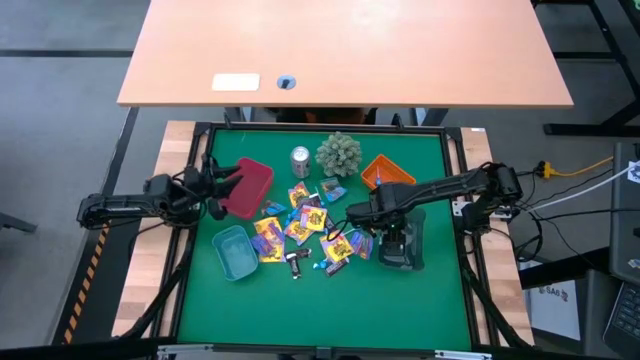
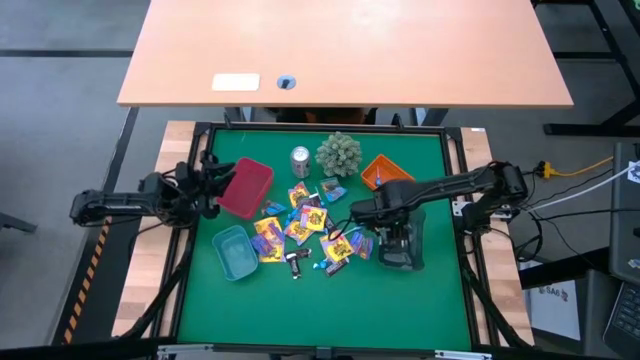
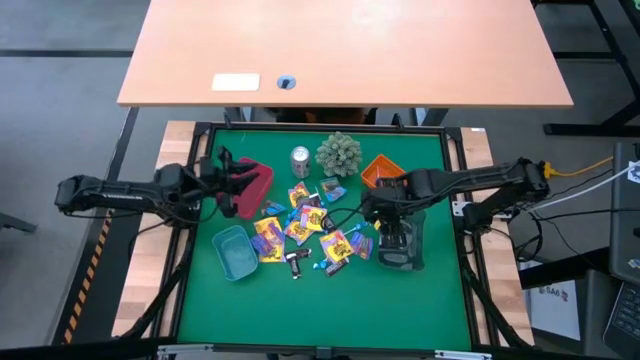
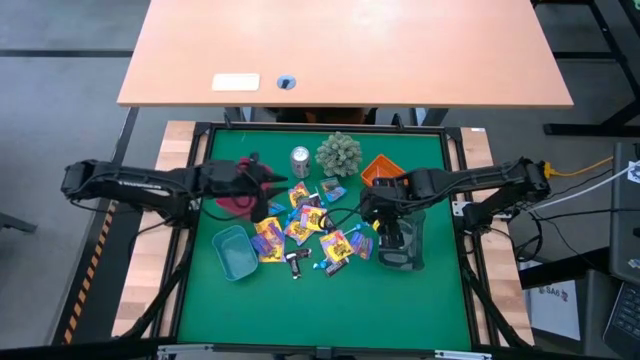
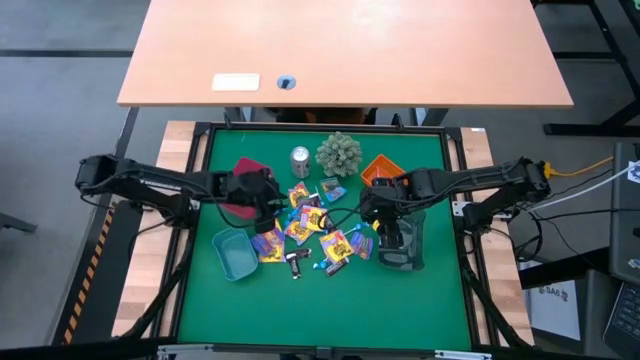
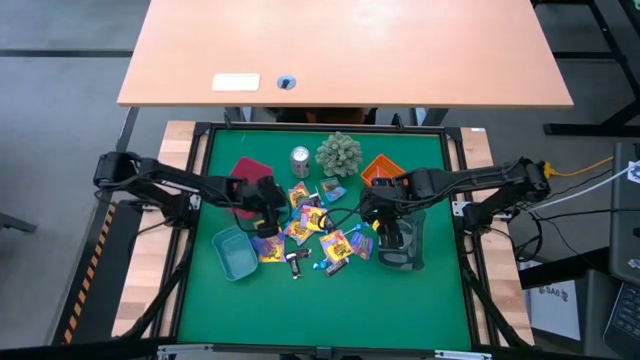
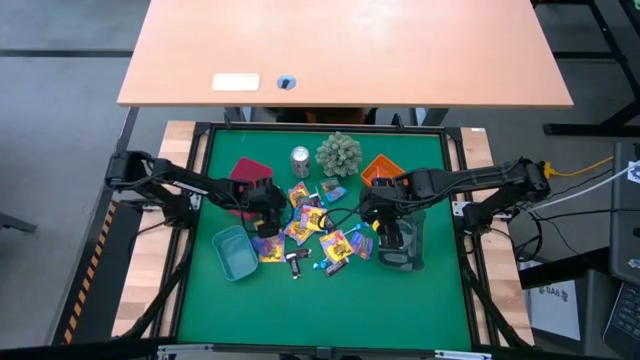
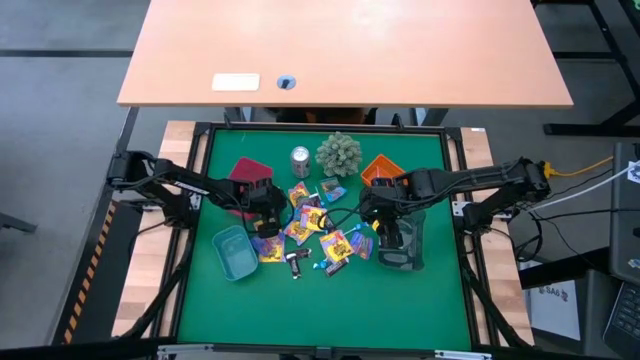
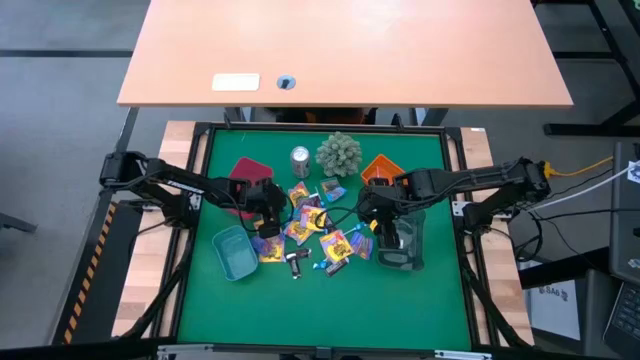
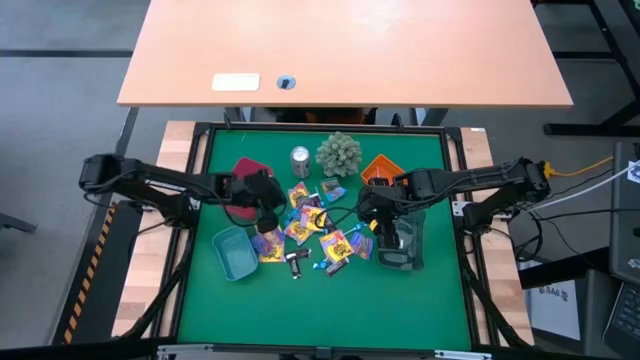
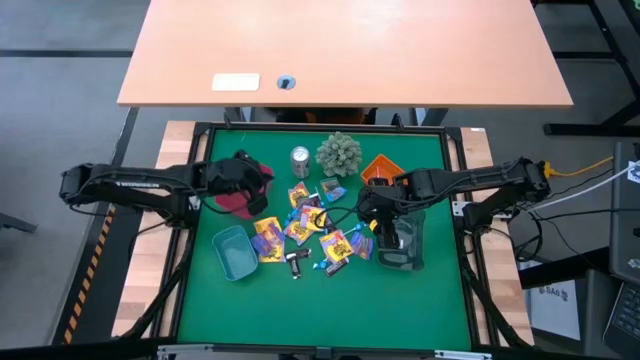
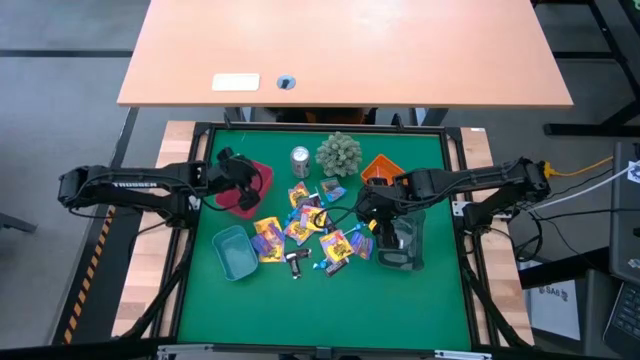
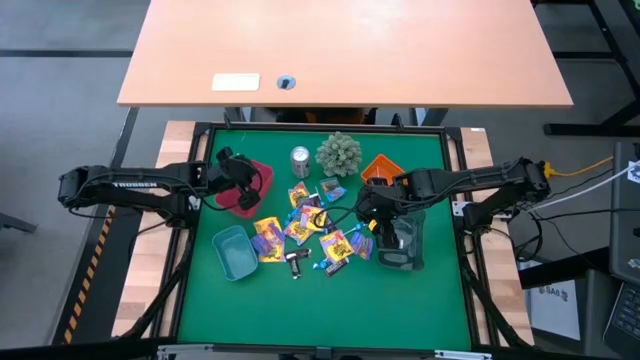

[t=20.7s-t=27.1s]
Task: Sort candy
Put the blue gummy into the red transparent bin

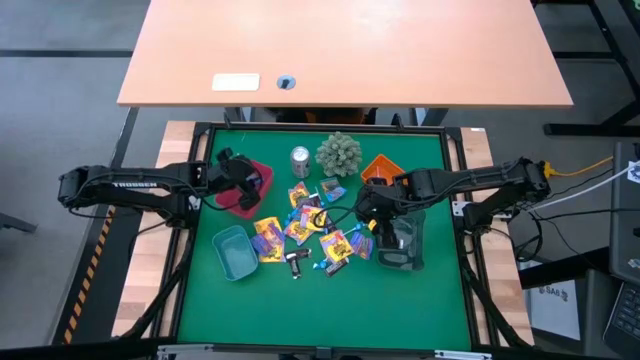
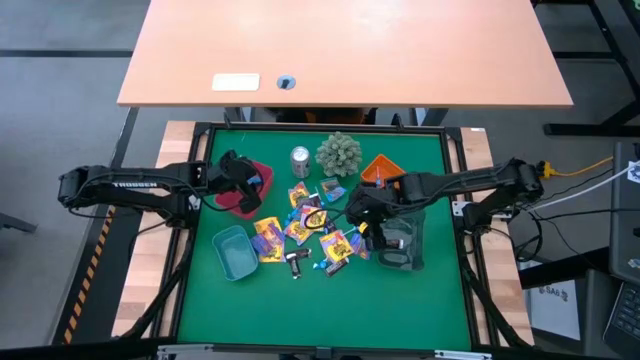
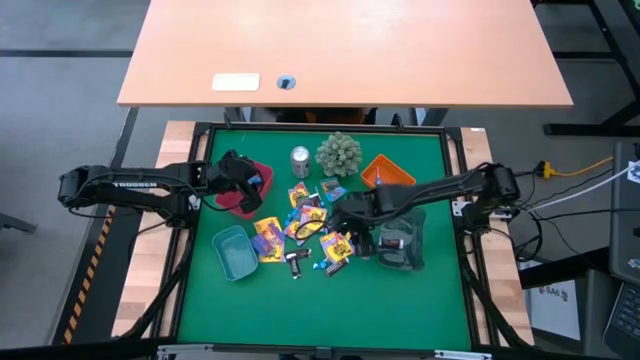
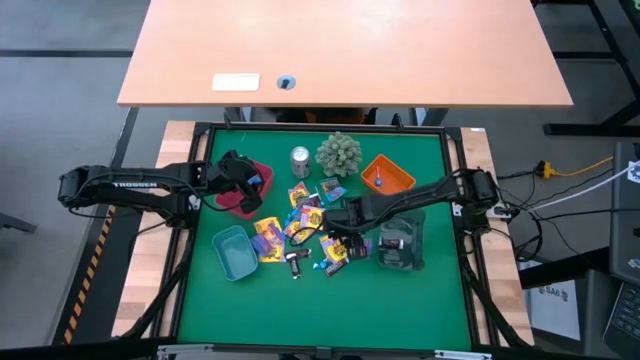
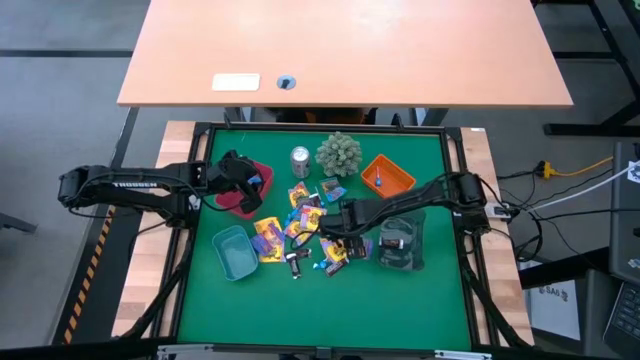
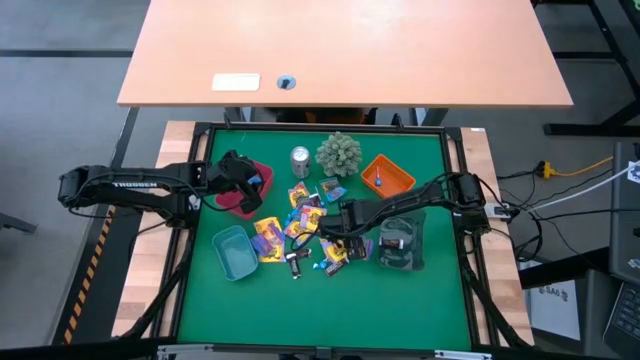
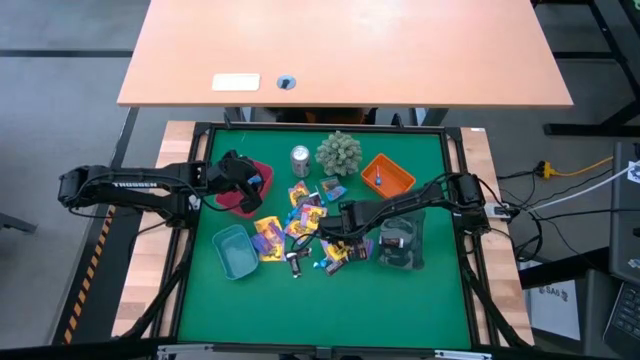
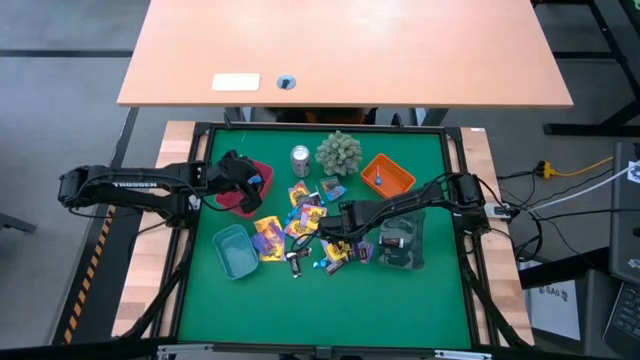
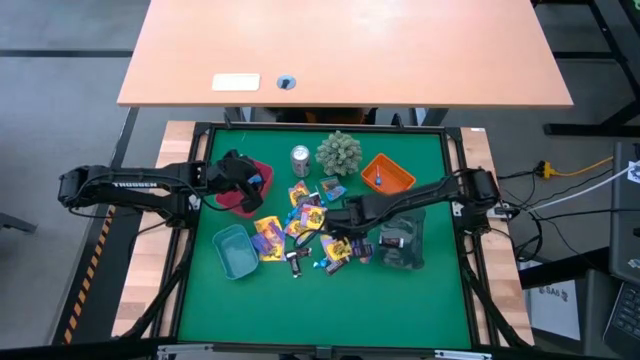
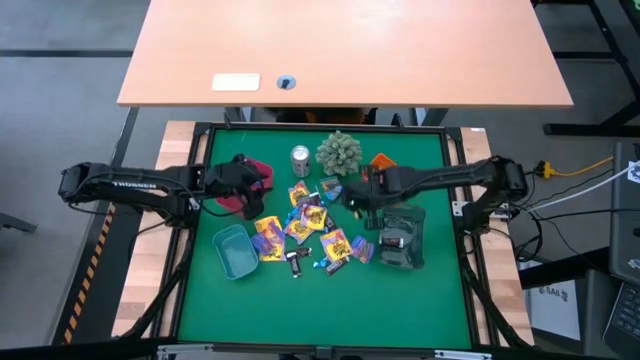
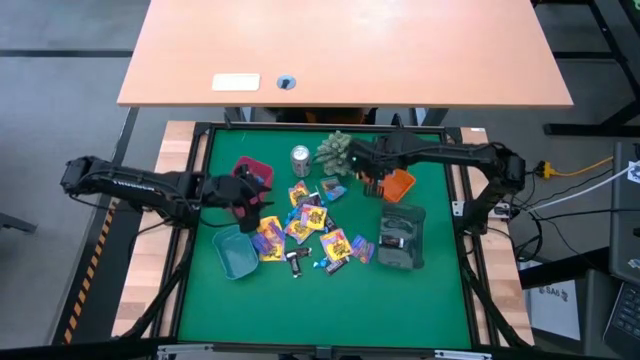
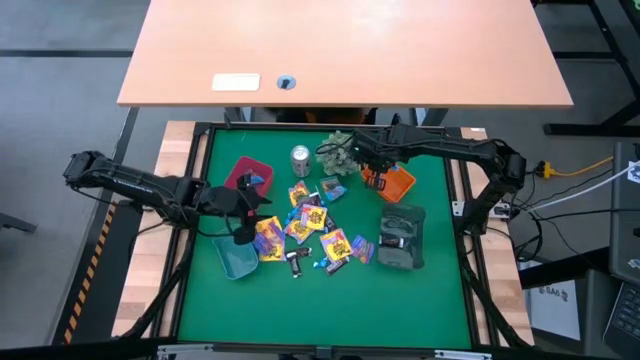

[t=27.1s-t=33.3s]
Put the blue candy into the orange bin

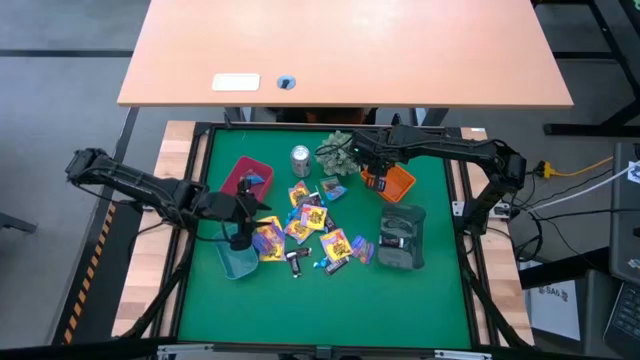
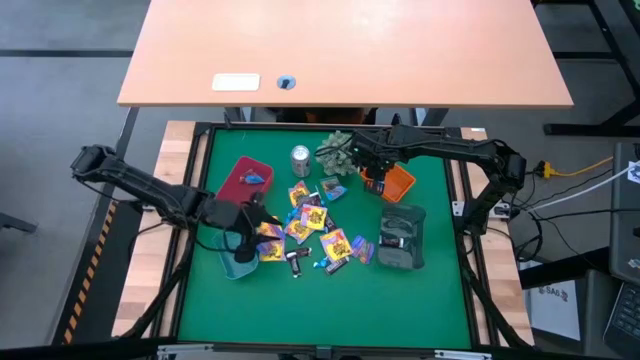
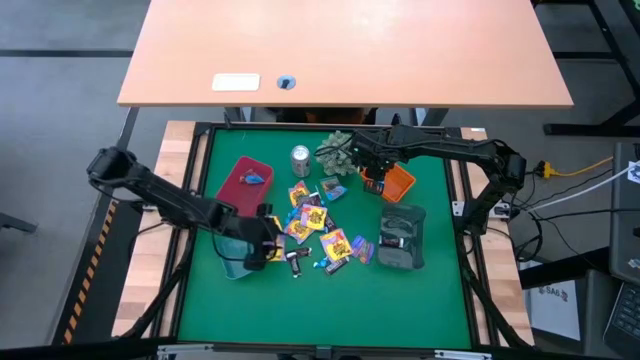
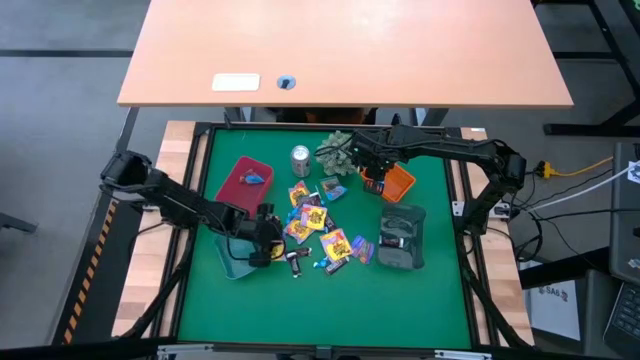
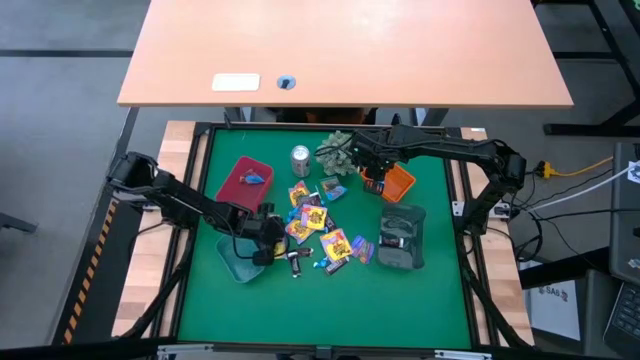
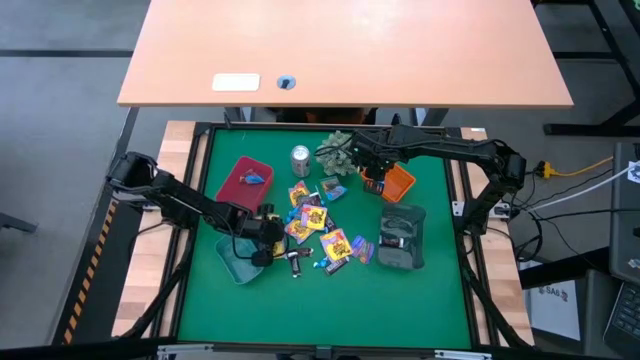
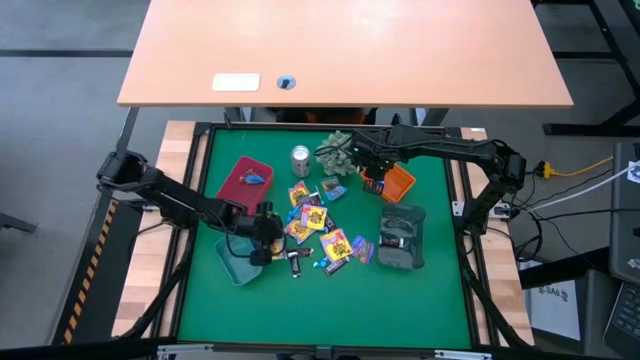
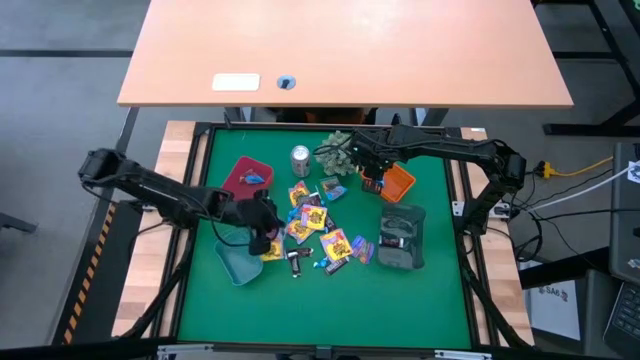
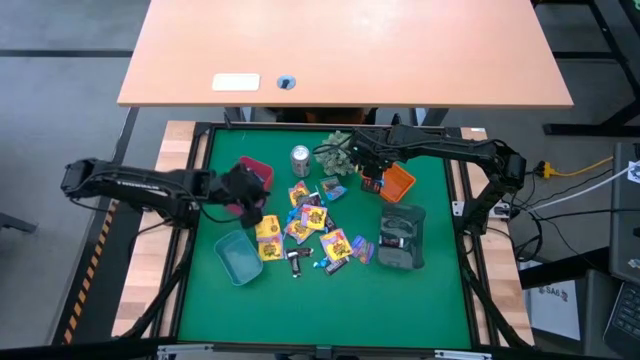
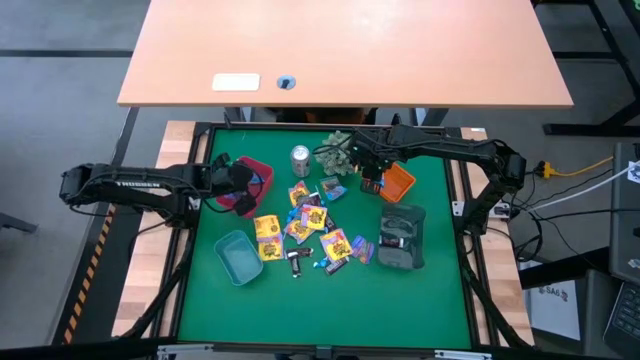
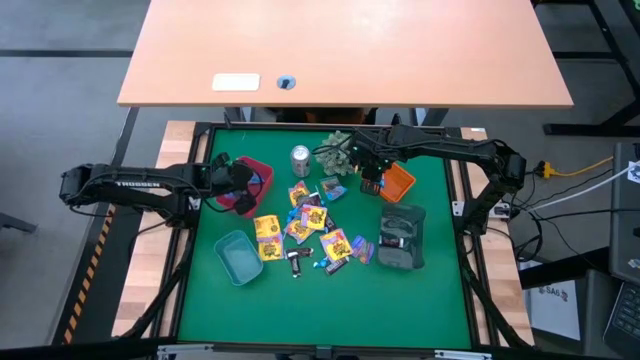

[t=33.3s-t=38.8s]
Put the purple gummy into the red transparent bin

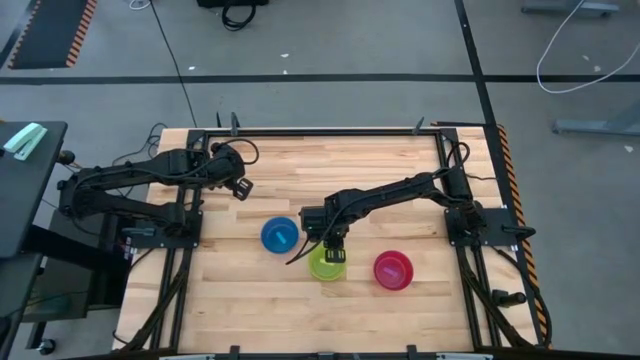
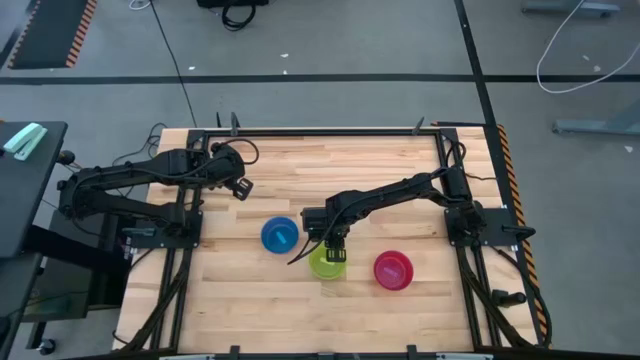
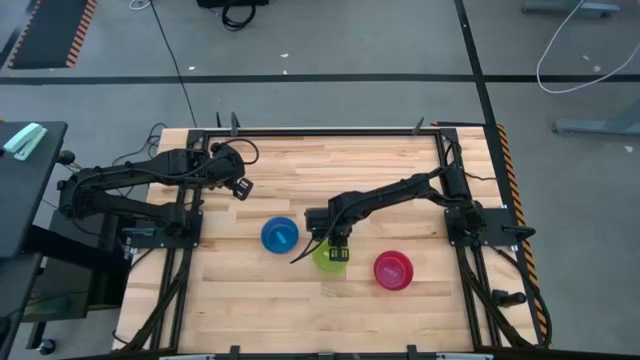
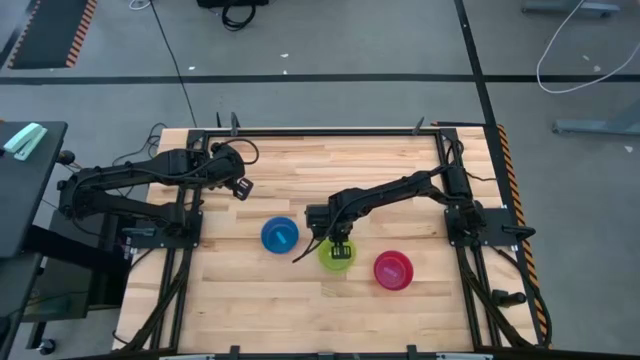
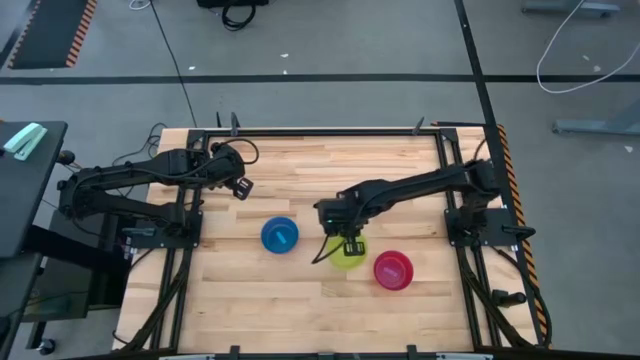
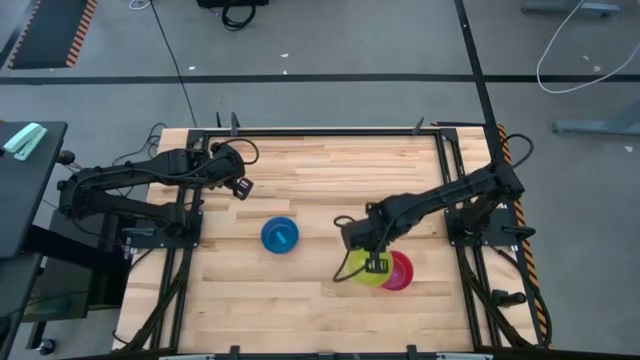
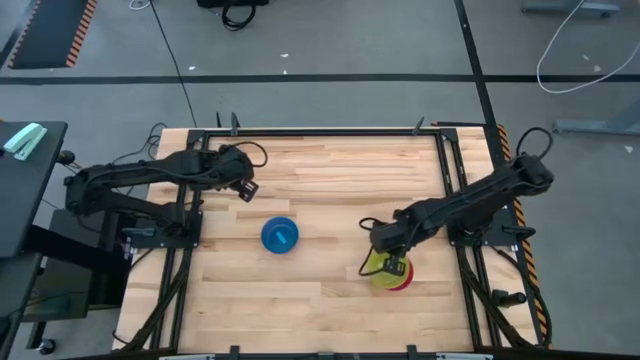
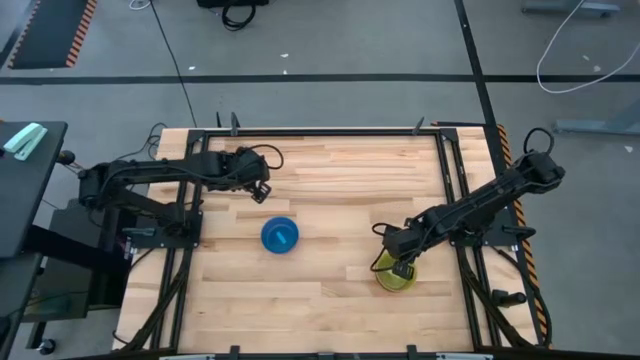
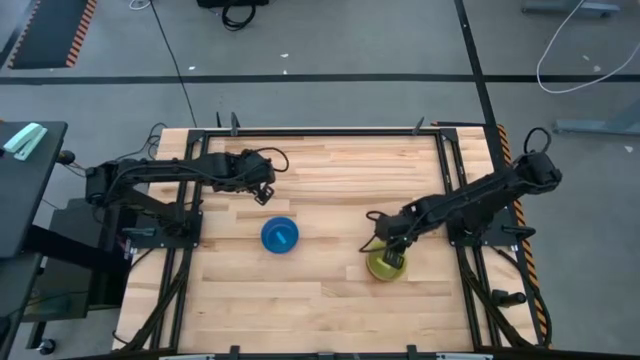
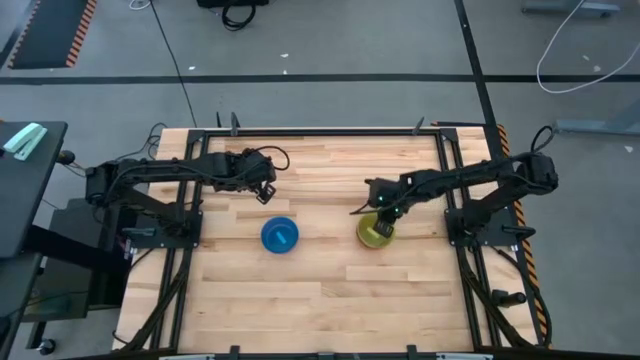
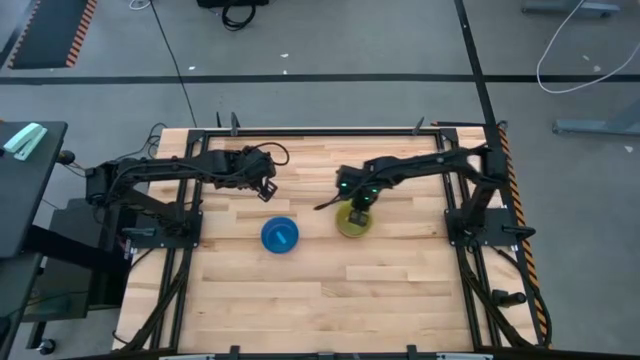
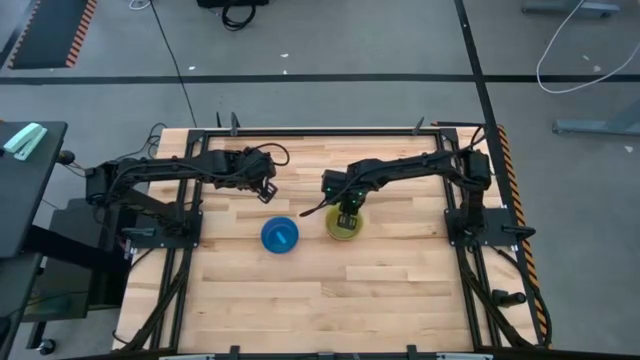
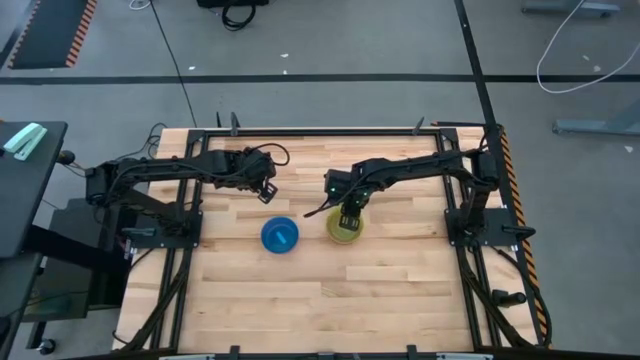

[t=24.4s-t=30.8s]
Task: Nest bowls inside each other
Stack the middle stacked bowls on the right stacked bowls
